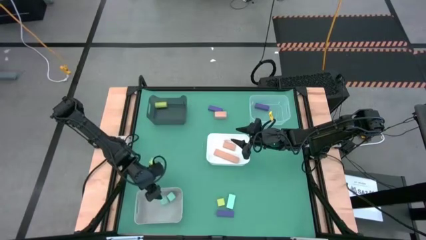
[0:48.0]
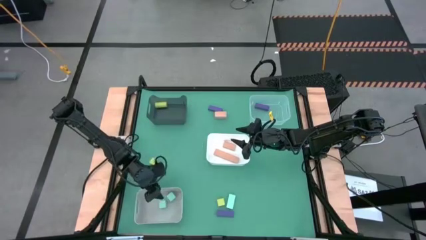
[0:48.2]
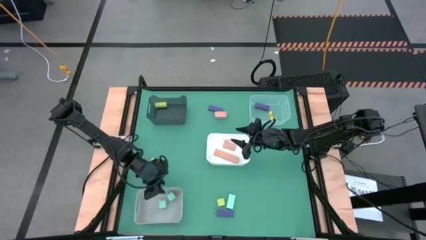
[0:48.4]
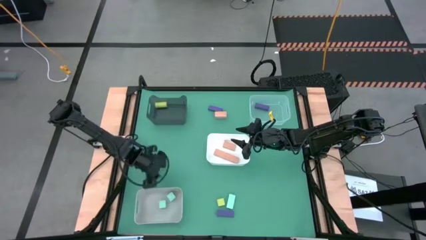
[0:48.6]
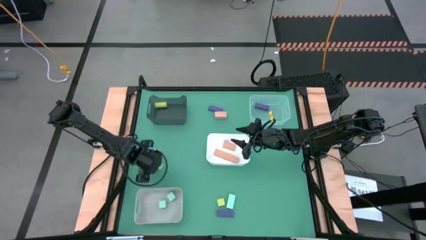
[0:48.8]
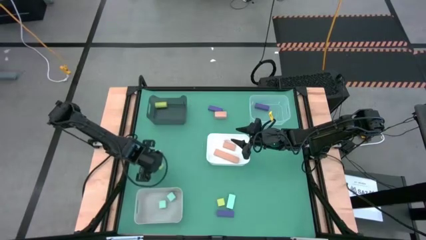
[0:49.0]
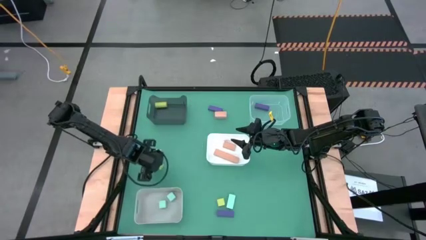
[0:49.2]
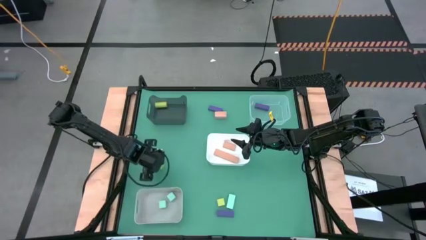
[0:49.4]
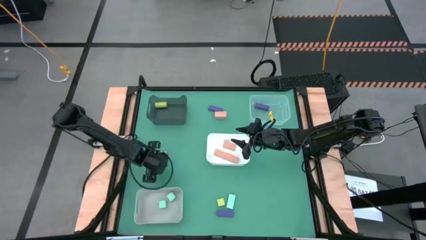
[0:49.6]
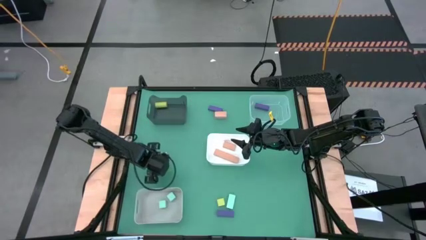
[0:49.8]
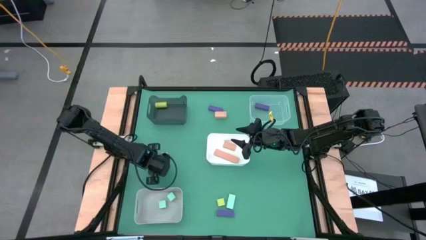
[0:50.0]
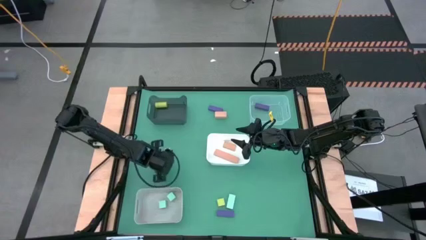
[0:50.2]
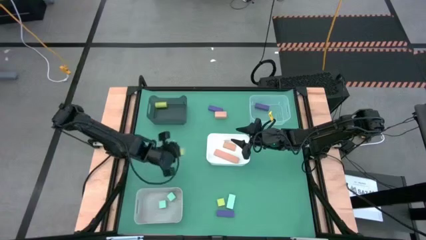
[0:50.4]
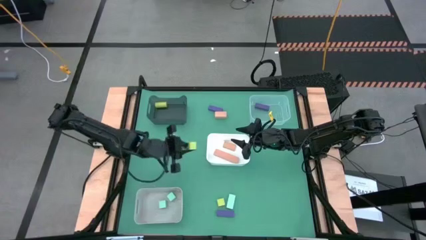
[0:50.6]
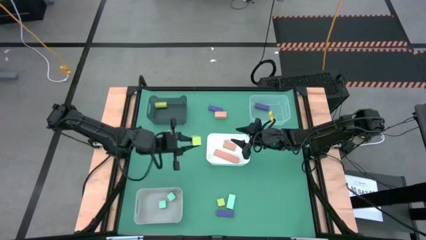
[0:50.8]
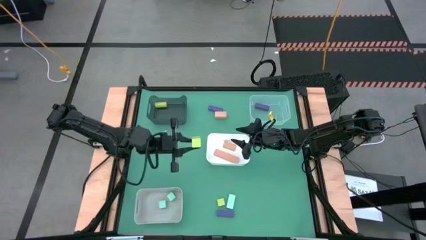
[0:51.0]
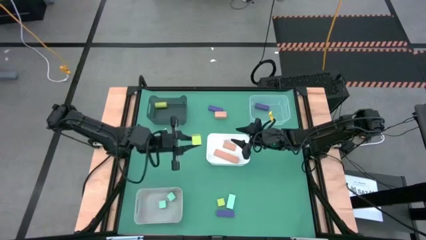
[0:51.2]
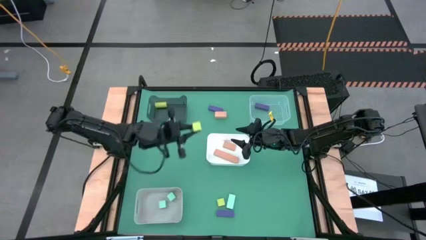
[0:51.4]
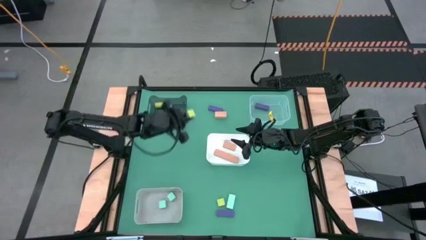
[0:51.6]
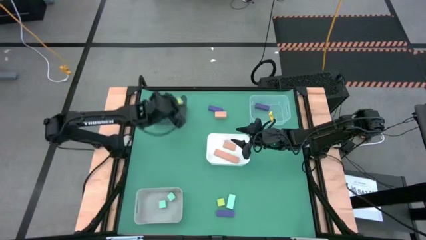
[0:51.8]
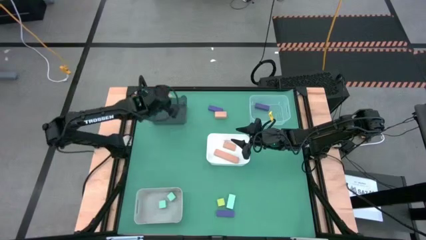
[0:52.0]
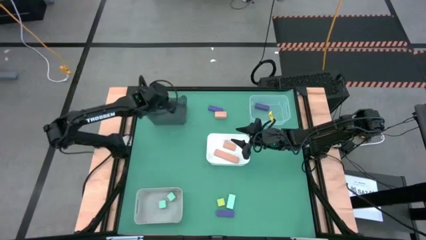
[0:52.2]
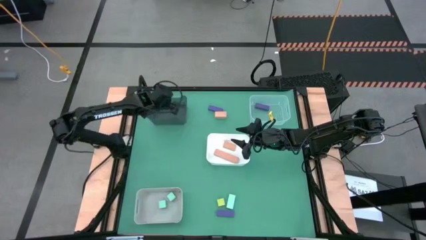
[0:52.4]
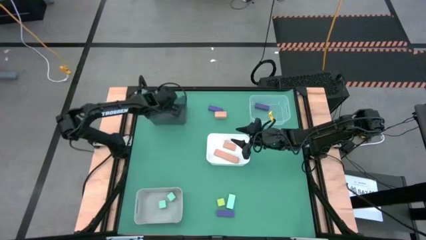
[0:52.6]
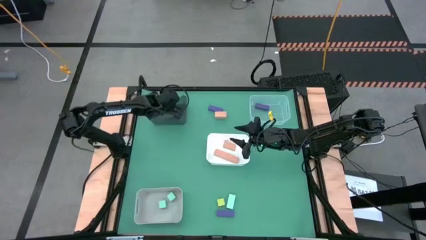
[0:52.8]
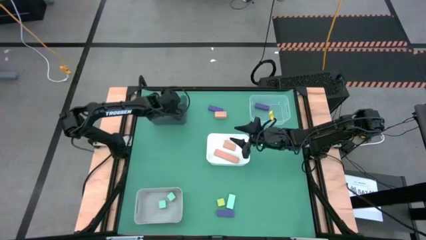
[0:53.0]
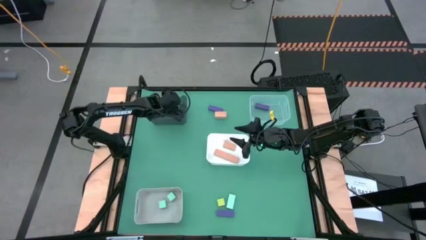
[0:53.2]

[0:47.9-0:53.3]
Task: Sort & place blocks by color
Put the left green block into the black bin

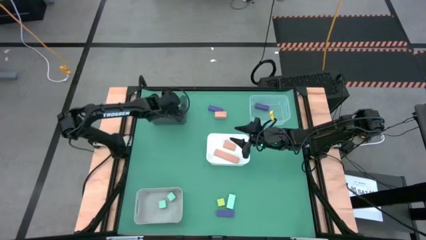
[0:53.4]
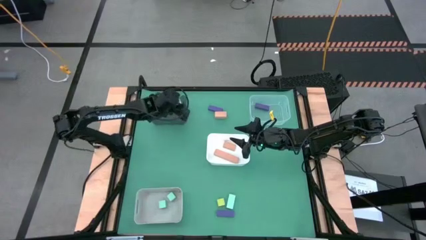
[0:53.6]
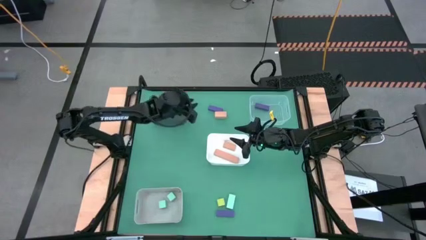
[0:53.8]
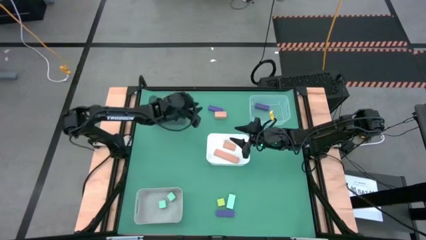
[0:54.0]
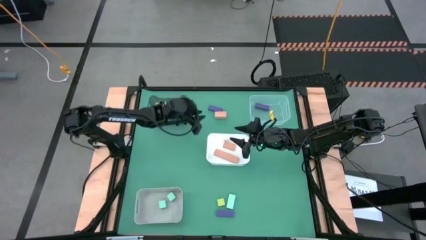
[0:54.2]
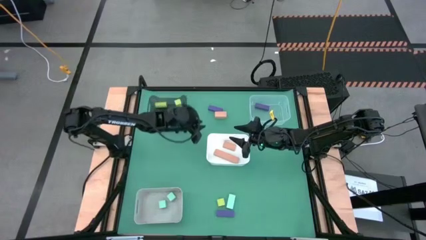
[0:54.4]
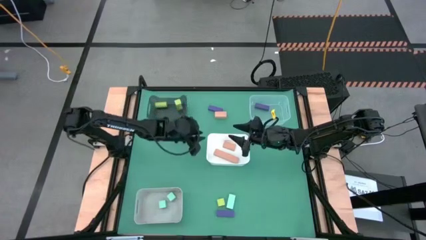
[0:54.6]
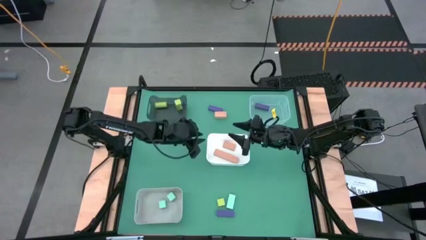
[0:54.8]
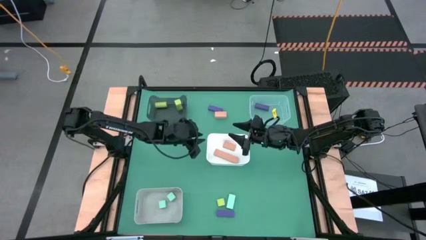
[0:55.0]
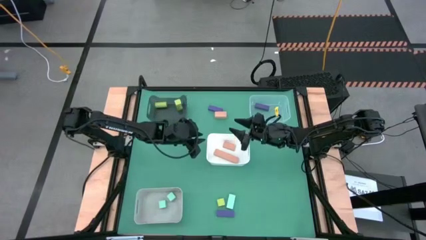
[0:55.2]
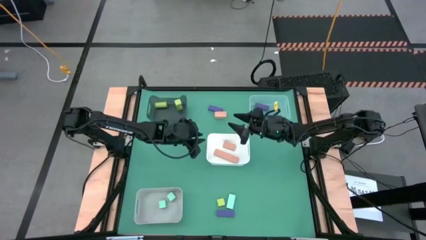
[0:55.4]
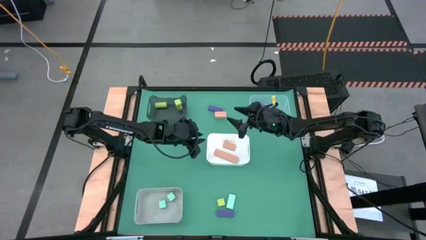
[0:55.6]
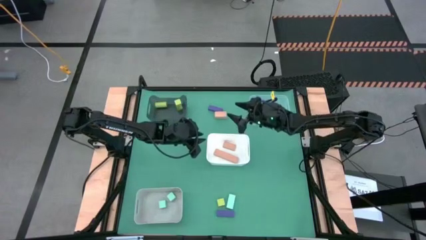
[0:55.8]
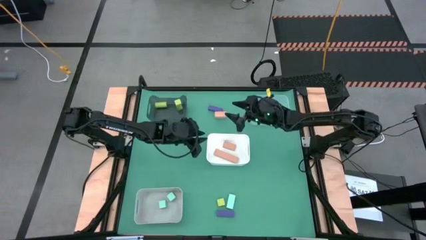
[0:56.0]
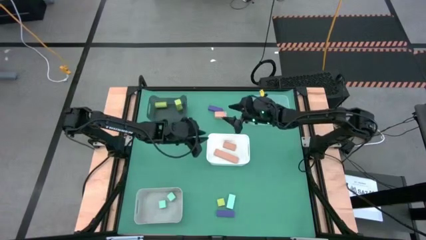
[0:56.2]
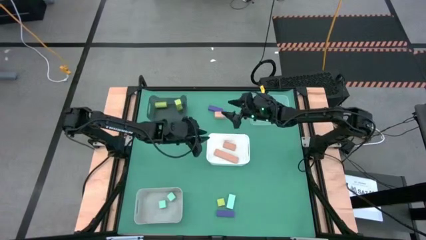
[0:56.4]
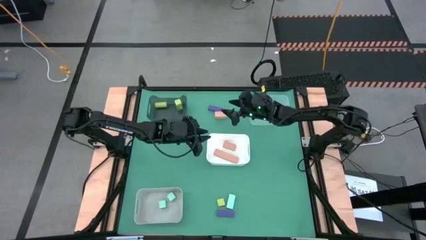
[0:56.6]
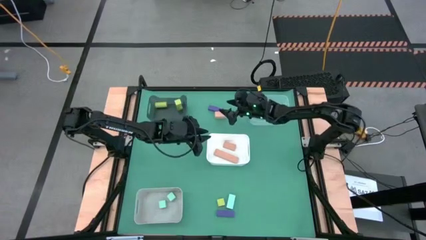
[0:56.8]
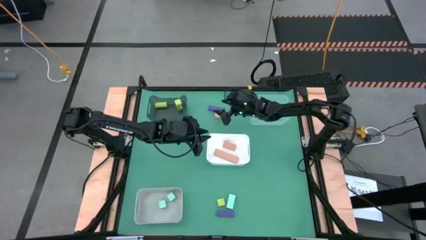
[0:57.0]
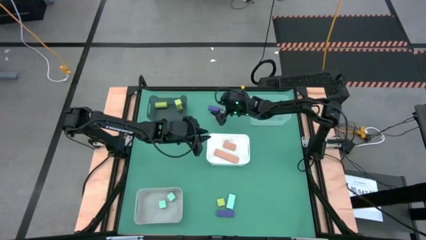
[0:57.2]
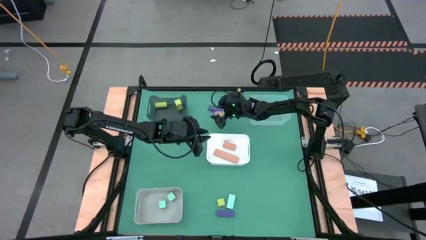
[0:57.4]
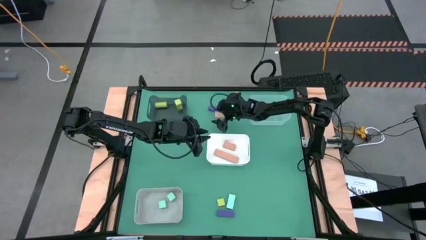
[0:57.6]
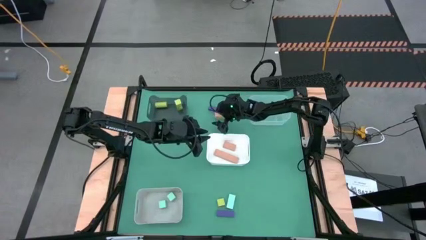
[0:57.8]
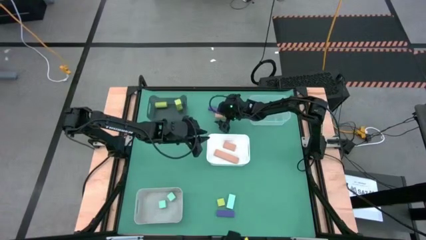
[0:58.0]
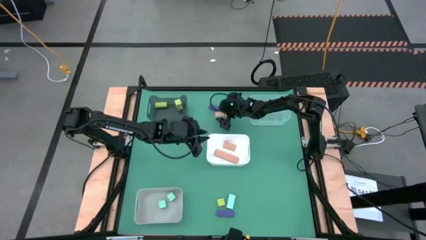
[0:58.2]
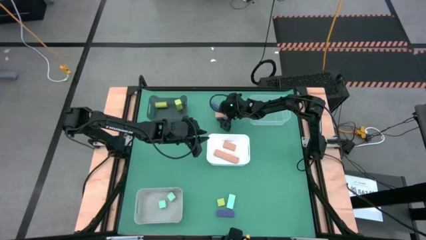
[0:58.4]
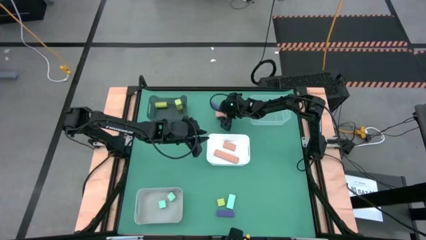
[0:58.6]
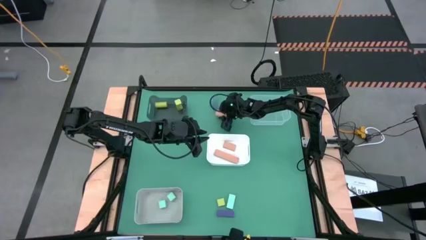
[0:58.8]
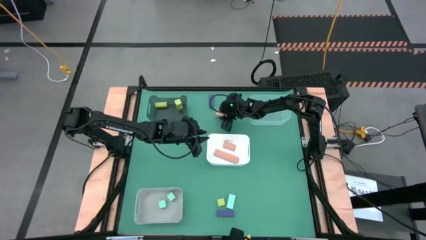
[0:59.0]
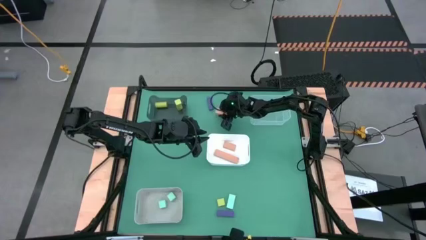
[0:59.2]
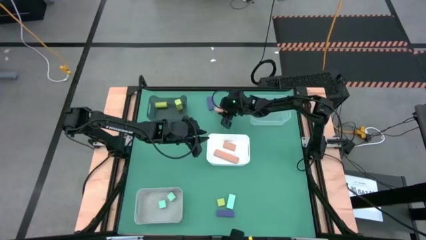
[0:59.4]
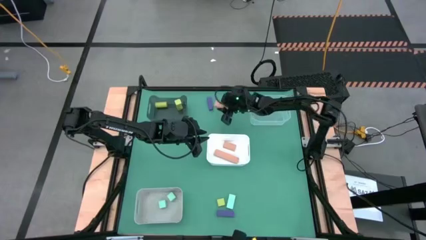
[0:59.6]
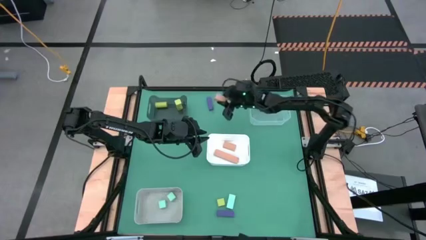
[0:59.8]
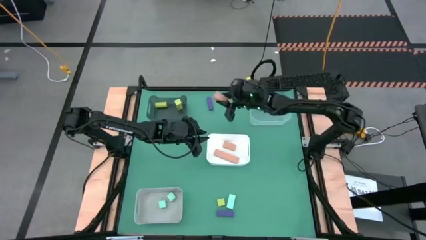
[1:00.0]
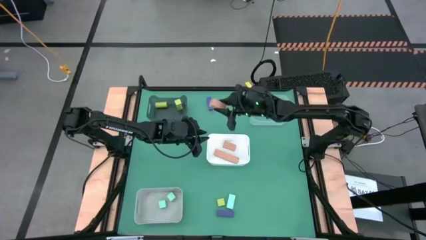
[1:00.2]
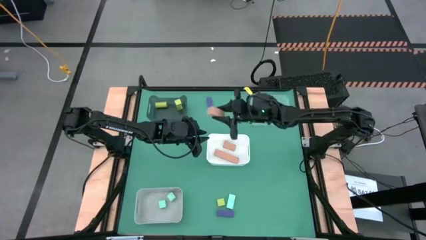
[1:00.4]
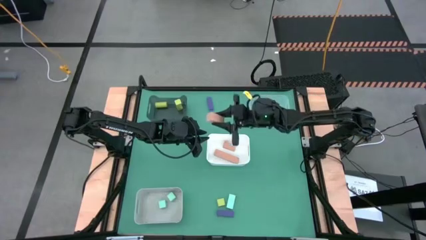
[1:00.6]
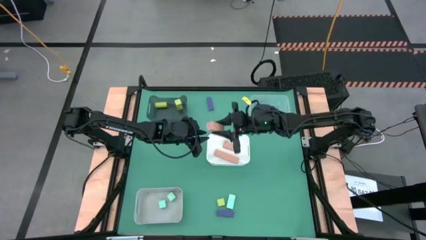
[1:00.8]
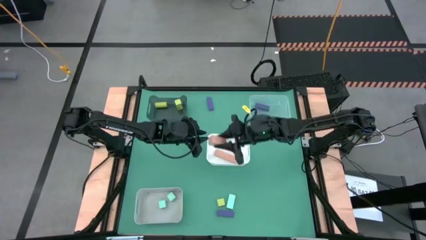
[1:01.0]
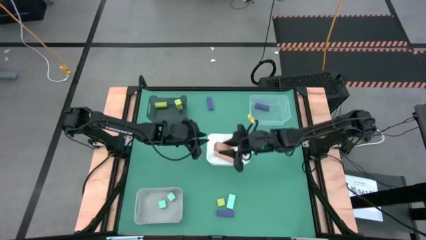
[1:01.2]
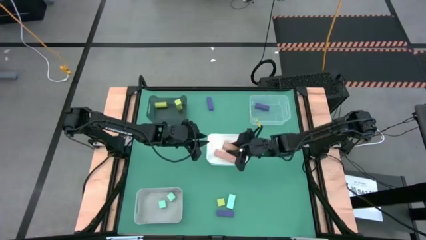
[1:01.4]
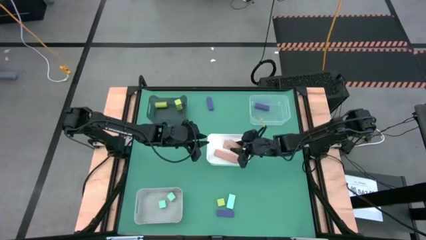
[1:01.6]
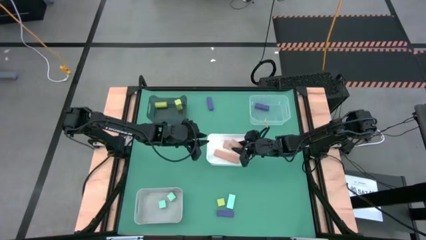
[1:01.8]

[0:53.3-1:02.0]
Put the orange block into the white bin
